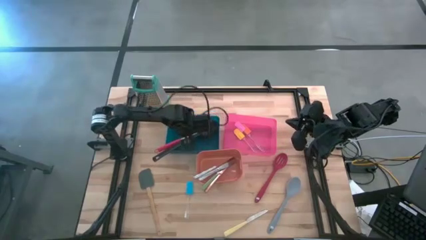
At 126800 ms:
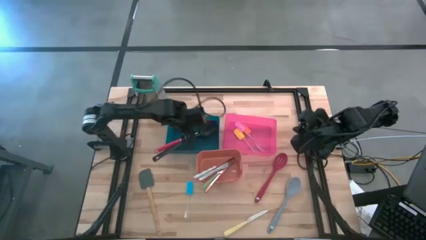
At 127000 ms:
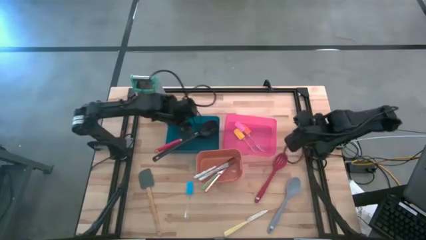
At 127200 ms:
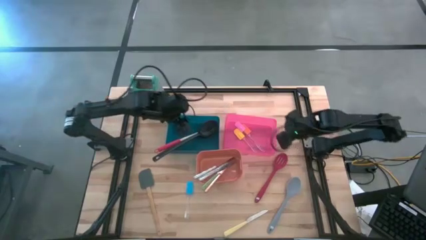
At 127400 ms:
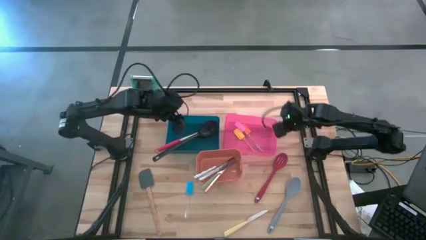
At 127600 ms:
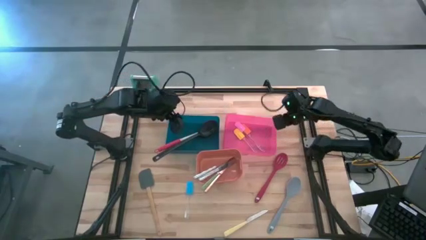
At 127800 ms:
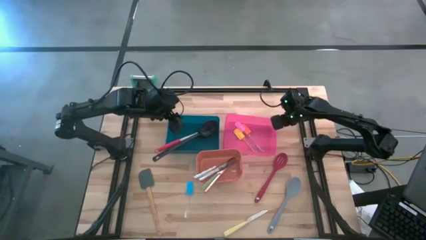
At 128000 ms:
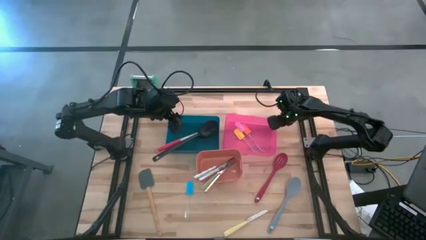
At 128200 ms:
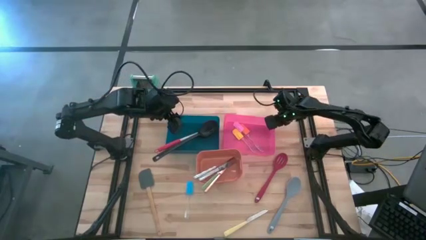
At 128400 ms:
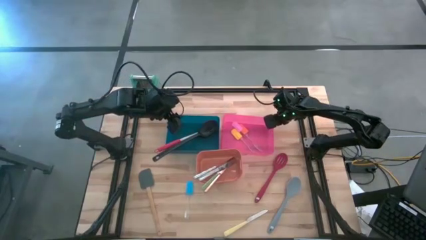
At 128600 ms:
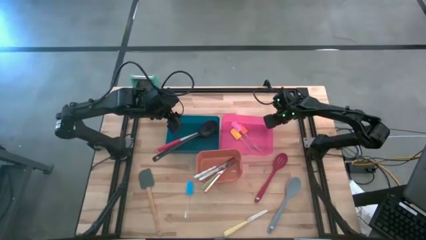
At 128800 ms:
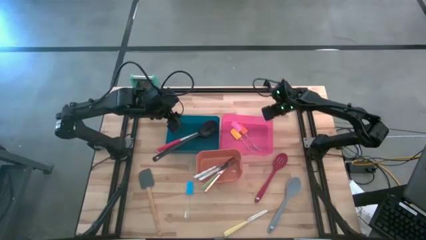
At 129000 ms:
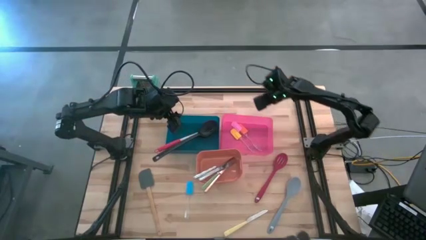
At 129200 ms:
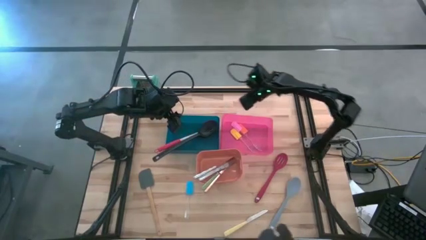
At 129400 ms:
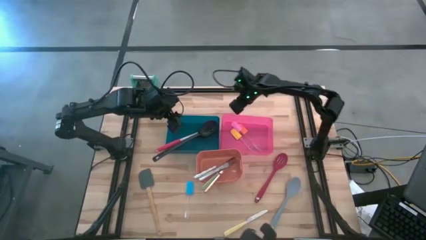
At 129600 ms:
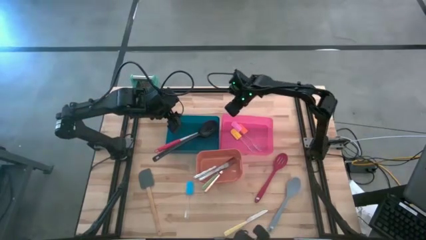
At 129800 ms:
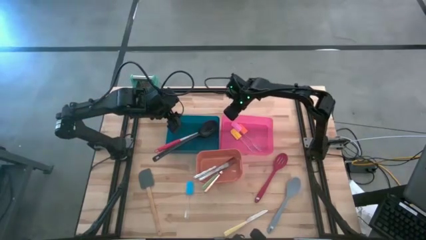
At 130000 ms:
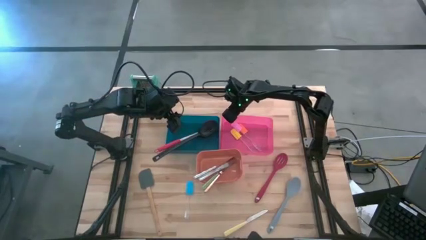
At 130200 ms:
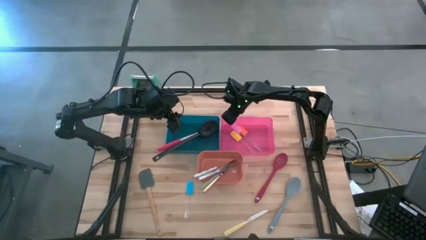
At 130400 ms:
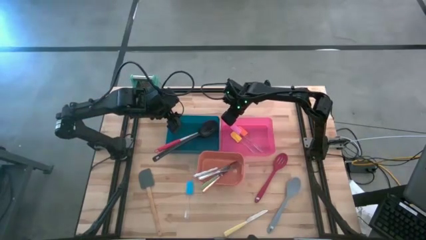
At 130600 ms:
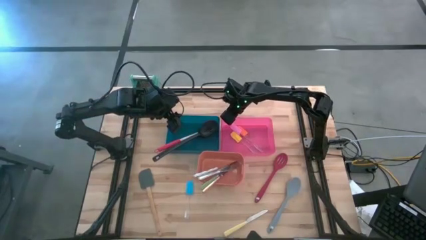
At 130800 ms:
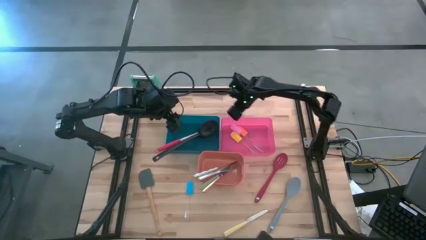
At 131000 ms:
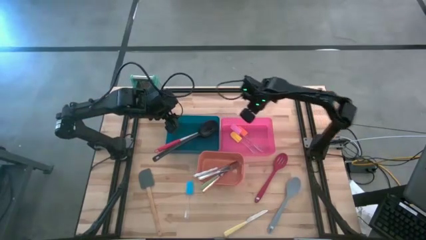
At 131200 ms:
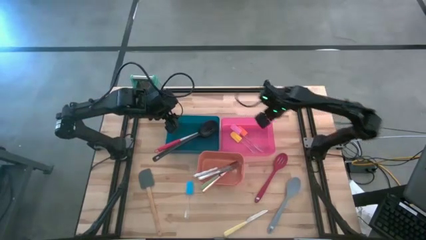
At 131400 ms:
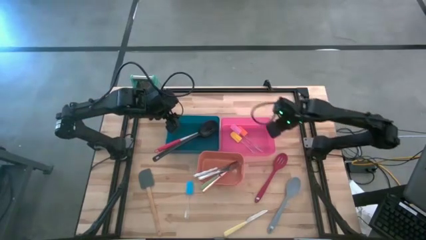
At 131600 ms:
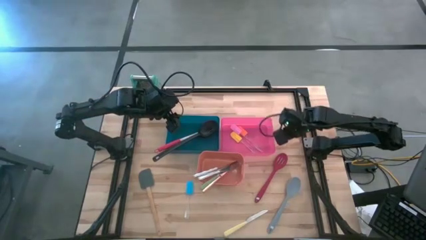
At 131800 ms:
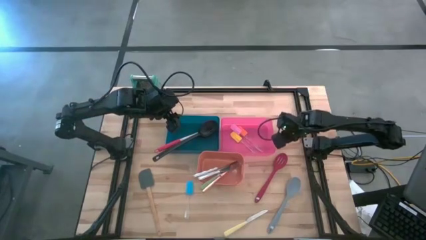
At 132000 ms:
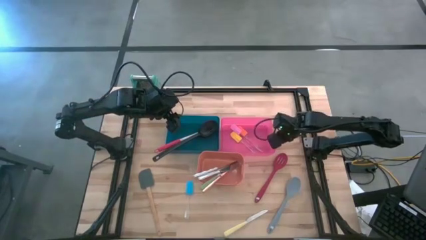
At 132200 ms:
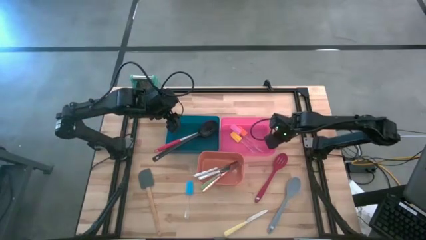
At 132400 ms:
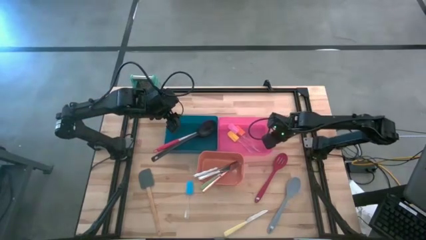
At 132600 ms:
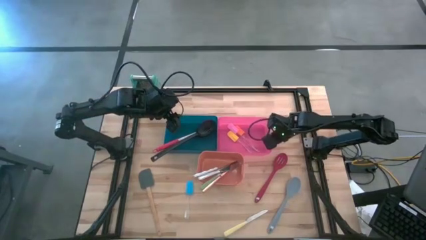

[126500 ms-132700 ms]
Task: Pick & Place Kitchen Items
Adjust the red bin

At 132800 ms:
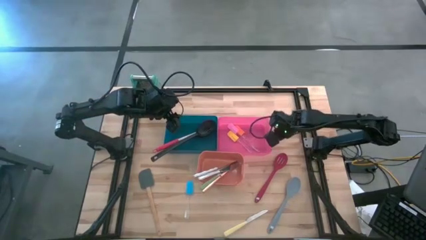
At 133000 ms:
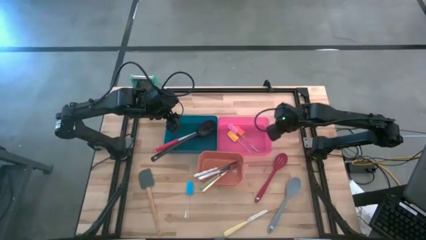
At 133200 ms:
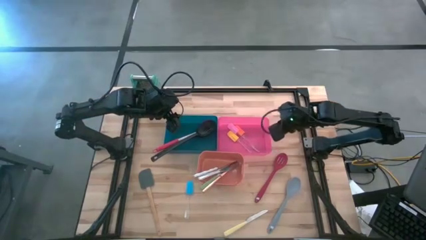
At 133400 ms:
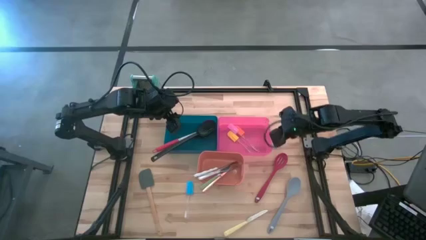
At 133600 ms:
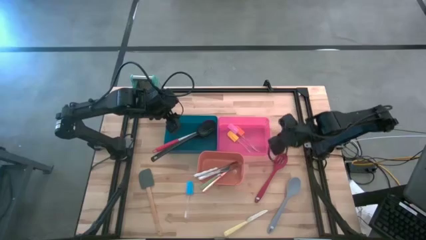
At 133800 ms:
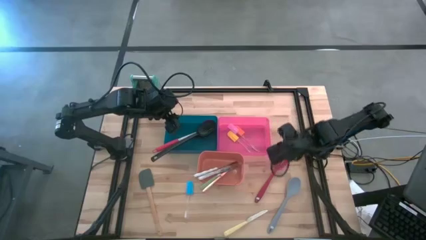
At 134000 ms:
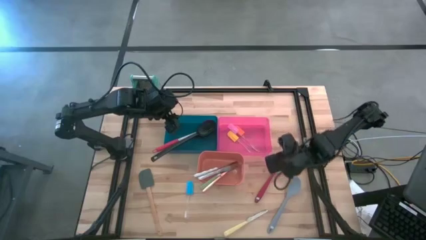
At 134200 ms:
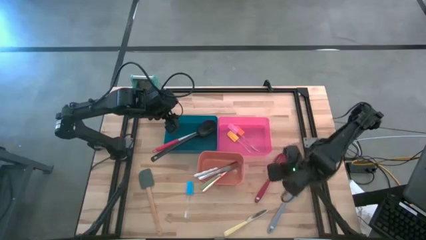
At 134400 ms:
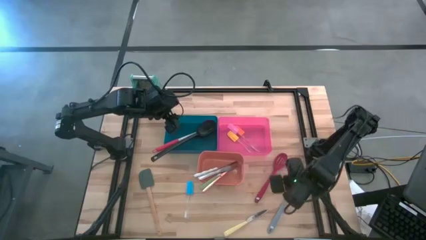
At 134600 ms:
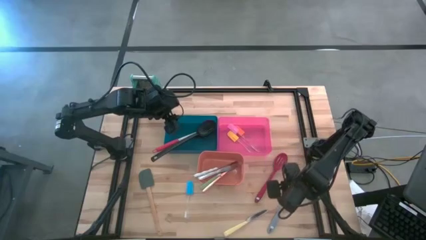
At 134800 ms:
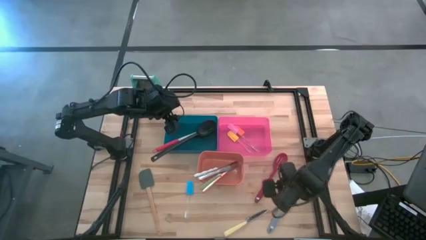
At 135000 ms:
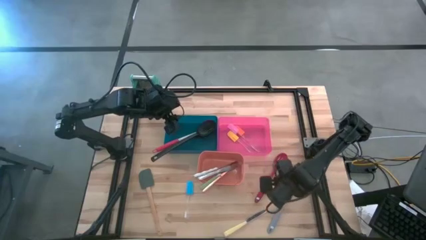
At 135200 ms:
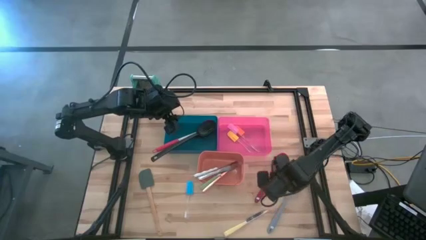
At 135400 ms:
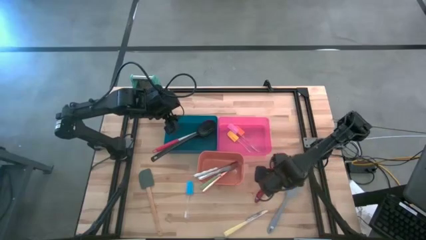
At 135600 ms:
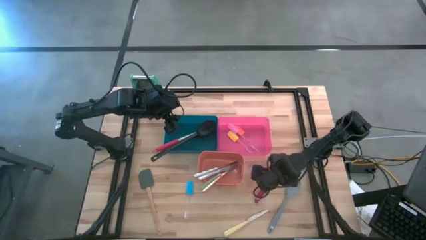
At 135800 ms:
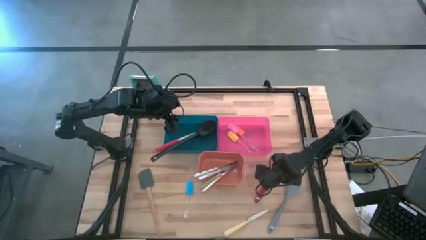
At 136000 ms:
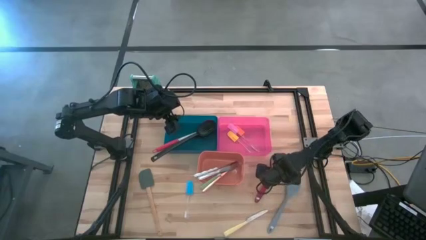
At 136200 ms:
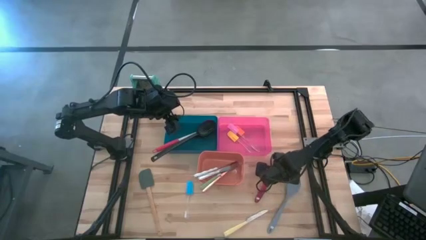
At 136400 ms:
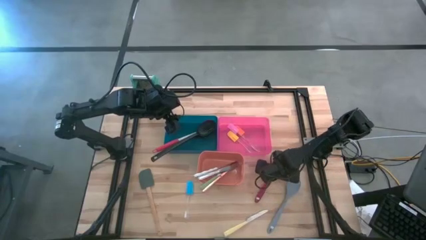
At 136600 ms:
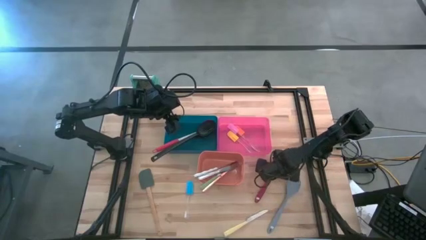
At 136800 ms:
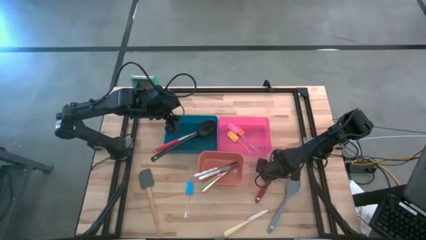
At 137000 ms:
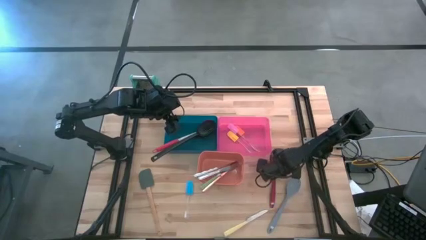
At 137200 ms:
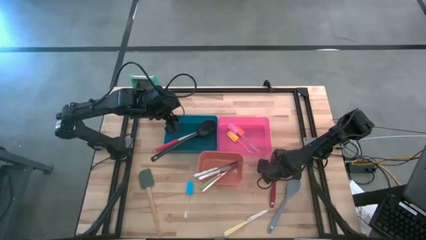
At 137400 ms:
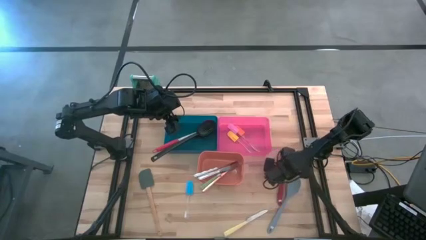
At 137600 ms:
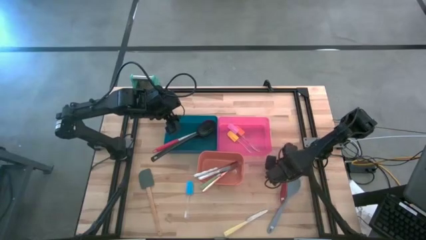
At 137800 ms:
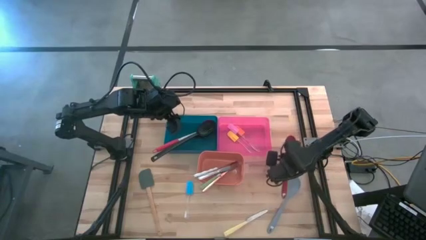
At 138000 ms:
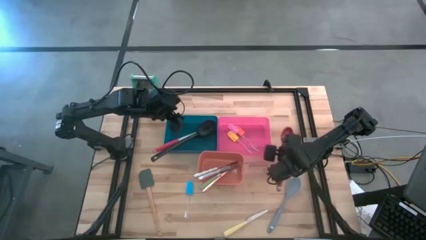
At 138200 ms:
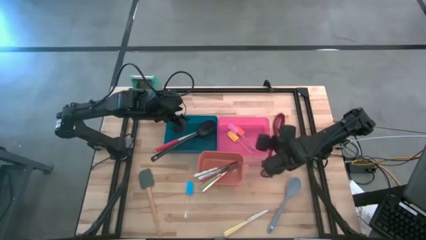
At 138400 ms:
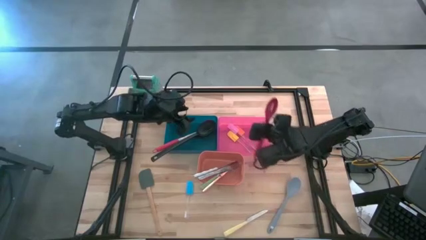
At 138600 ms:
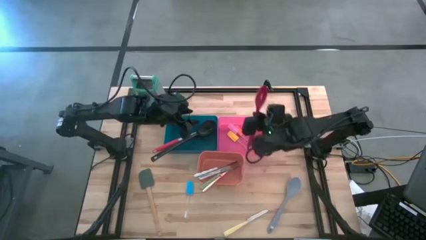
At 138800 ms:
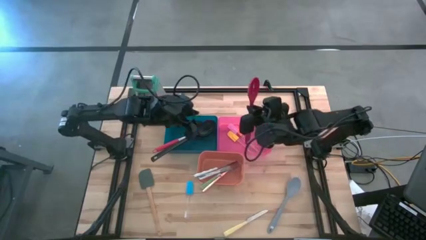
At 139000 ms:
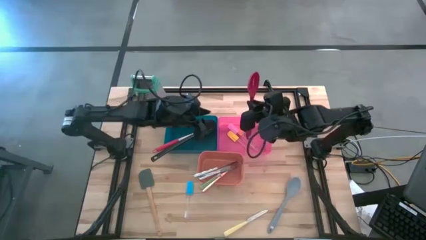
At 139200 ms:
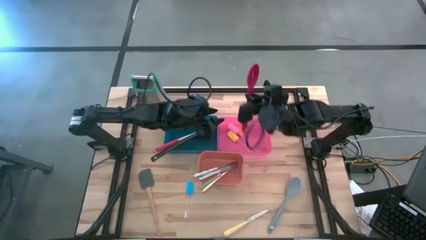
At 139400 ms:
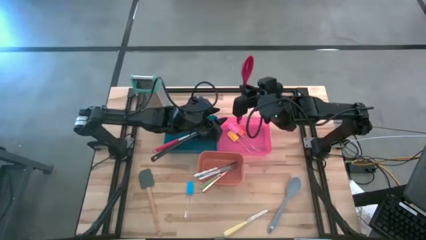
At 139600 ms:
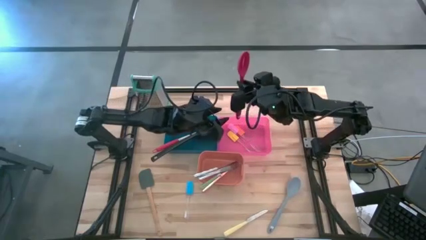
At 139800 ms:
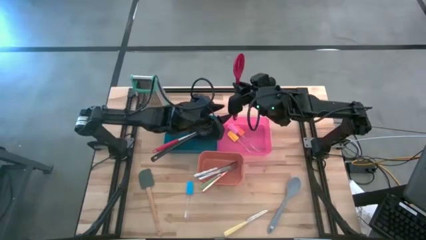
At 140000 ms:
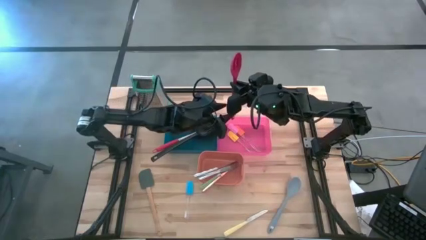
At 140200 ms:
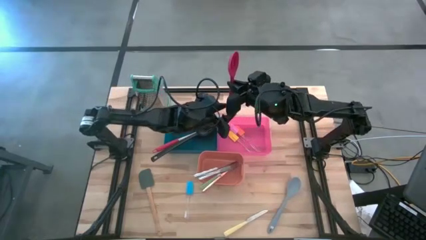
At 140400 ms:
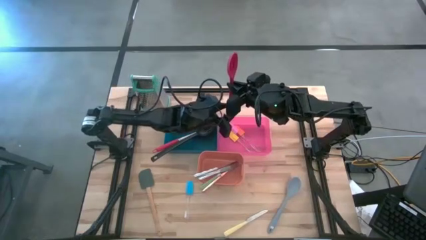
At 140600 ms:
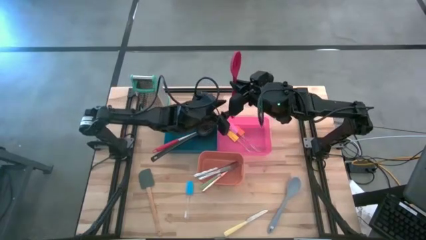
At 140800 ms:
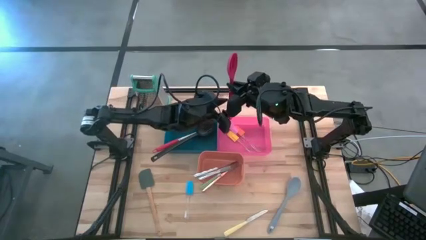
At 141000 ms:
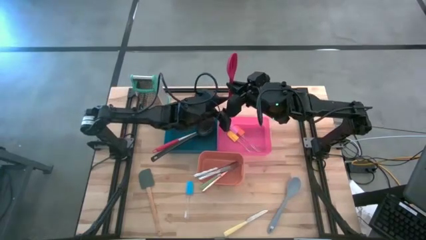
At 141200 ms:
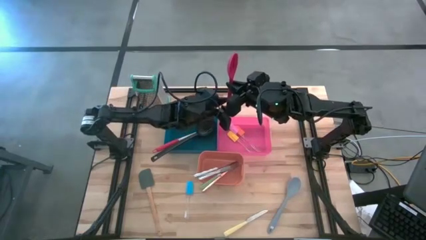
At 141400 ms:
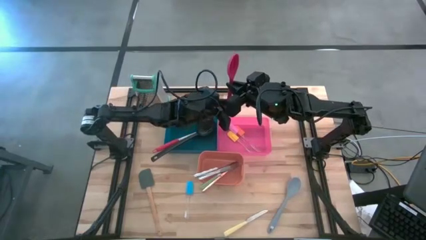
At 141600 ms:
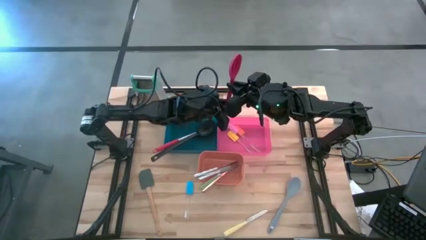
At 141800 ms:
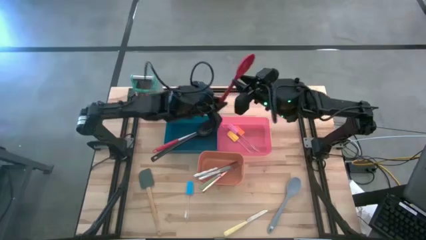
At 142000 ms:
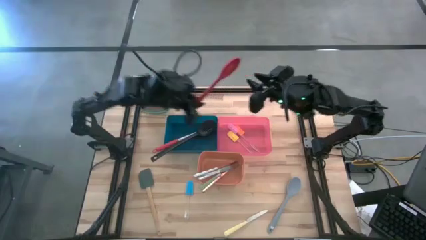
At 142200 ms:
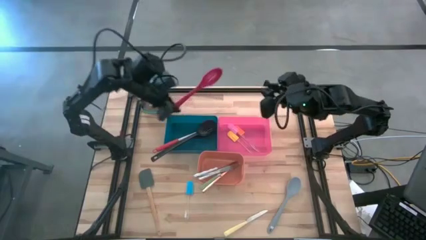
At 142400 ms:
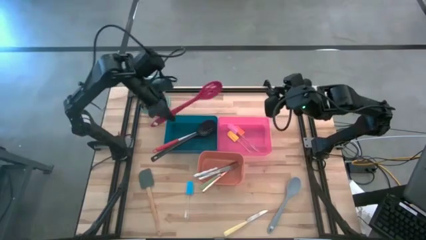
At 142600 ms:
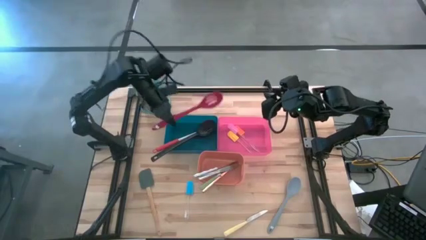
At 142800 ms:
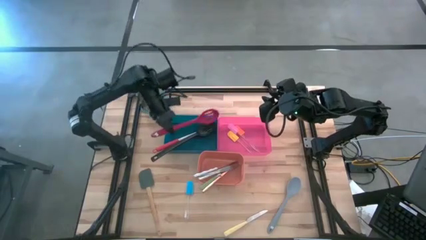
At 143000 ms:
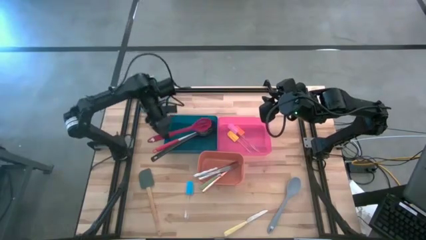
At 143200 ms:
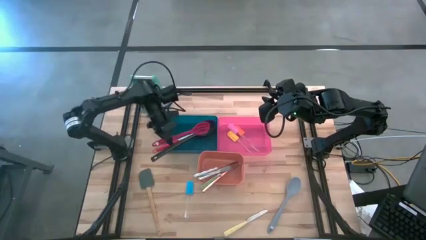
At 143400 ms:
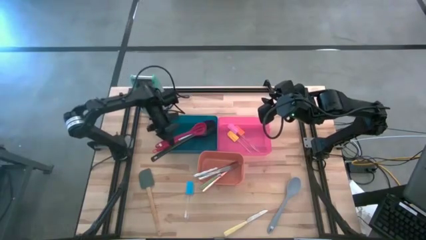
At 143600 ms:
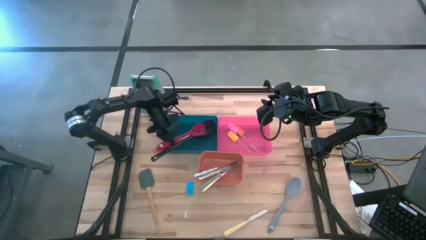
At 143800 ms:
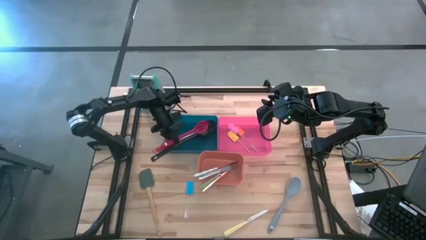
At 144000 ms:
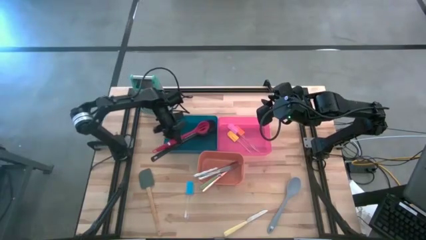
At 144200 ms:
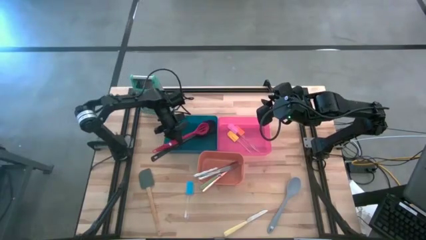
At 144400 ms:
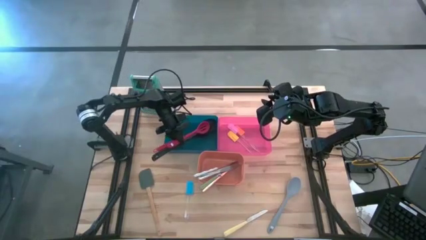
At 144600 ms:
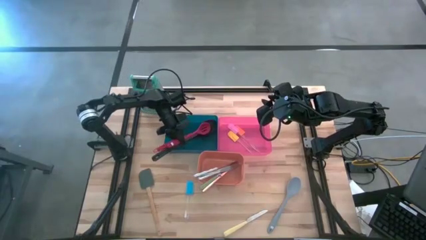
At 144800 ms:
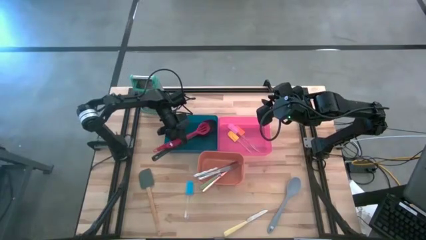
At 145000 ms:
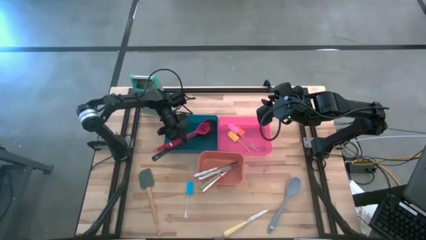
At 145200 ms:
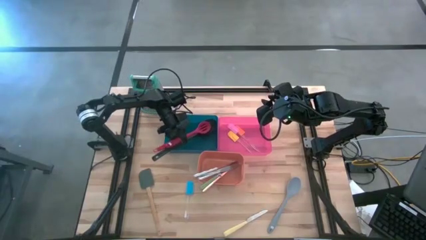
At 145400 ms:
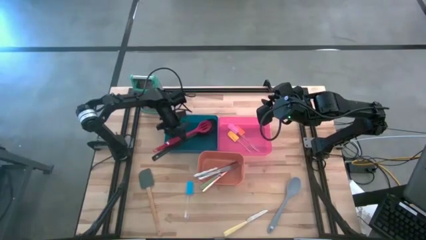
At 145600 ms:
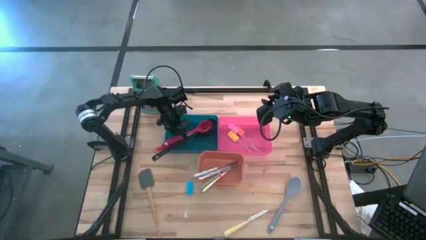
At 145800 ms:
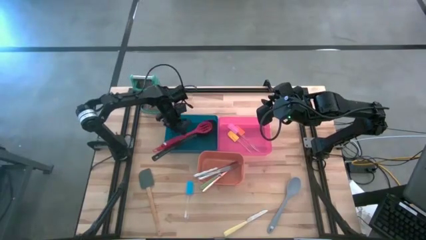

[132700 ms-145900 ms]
Put the red serving spoon into the blue bin
